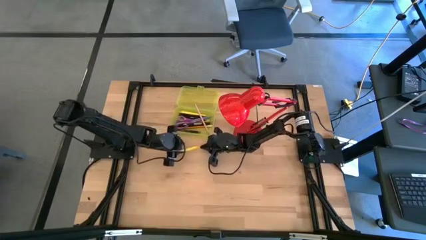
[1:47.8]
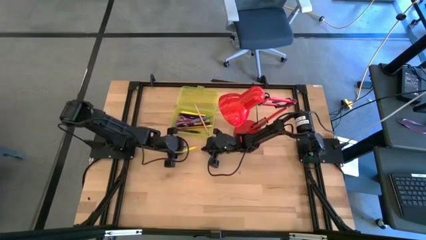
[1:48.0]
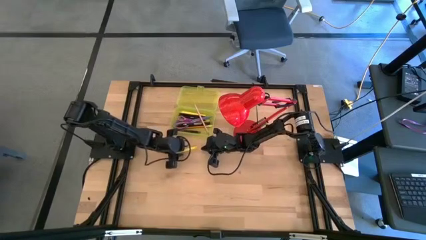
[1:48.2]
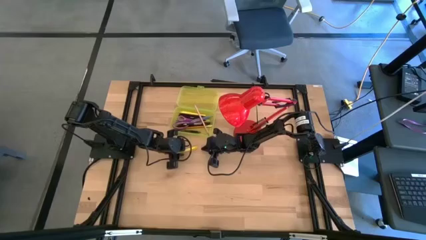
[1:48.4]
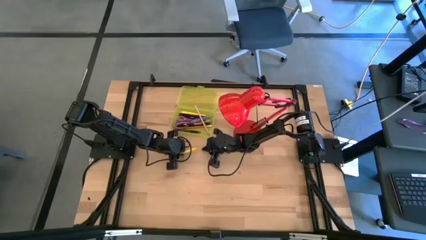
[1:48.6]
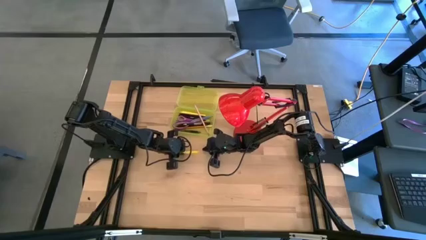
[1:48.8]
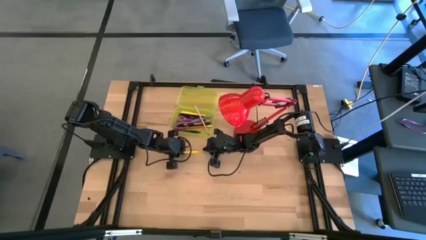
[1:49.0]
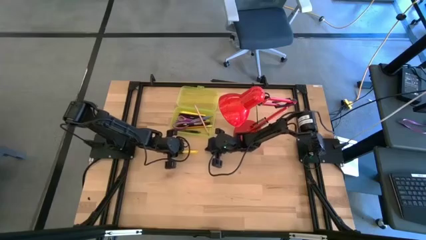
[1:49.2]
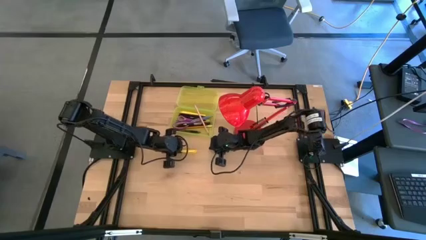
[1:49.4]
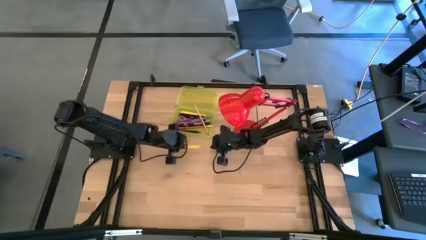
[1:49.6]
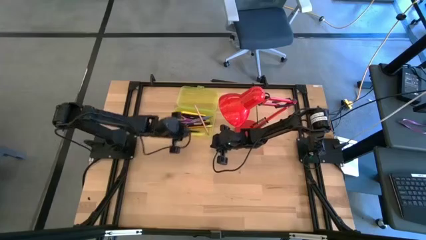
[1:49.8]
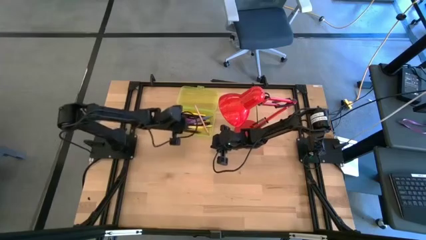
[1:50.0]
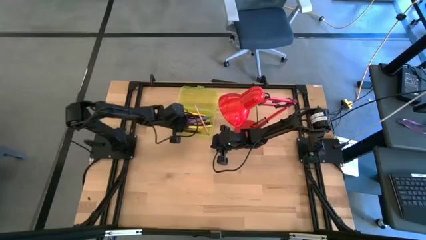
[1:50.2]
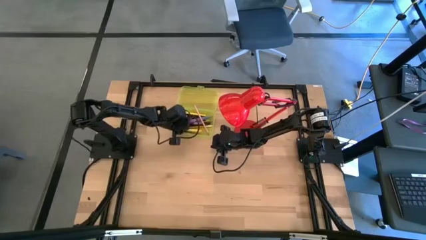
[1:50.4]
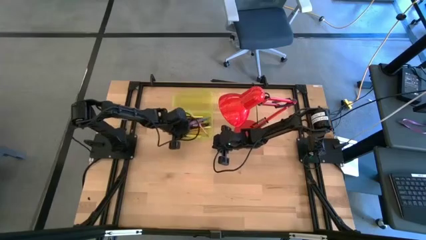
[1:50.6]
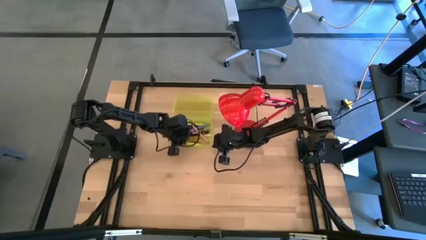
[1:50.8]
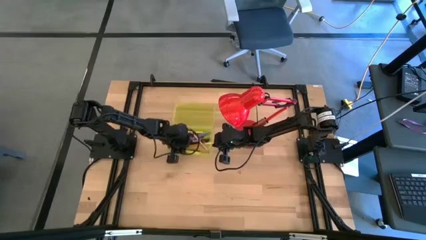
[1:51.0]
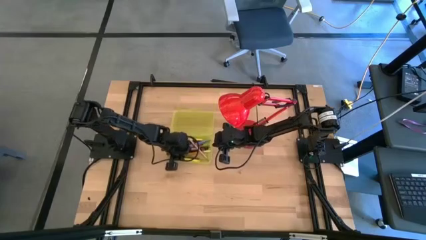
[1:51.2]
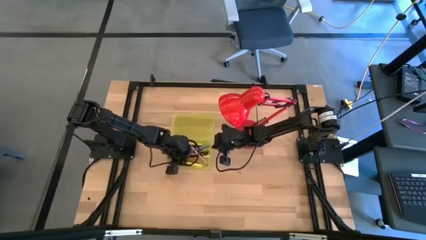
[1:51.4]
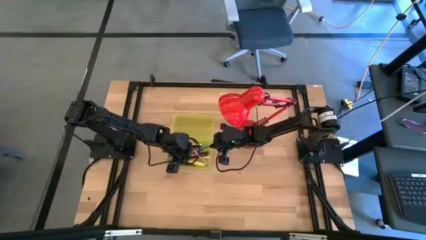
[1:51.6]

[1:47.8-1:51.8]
Task: Pick & place school supplies into a supply box
Put the yellow pen into the yellow supply box

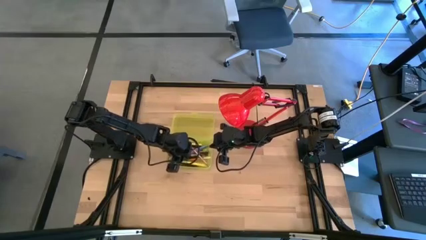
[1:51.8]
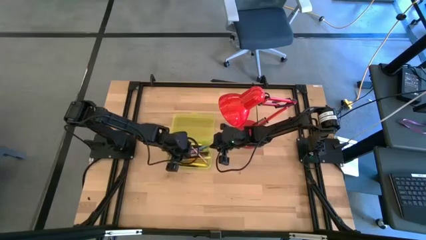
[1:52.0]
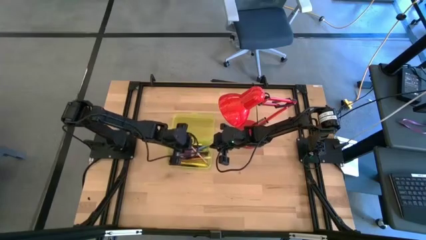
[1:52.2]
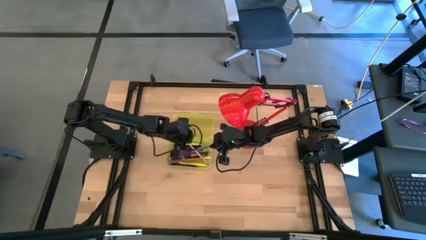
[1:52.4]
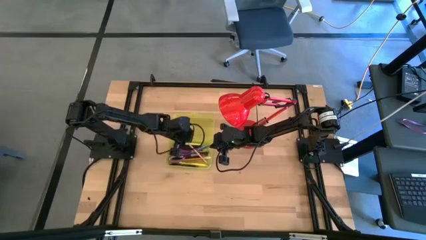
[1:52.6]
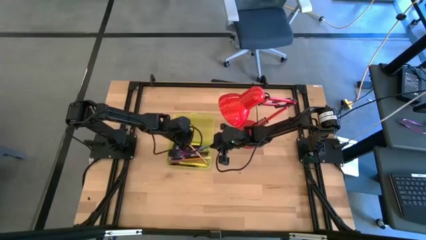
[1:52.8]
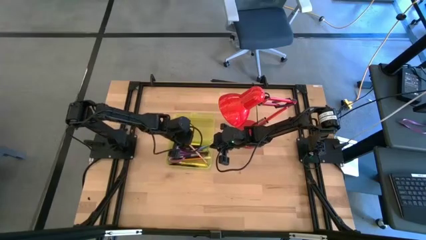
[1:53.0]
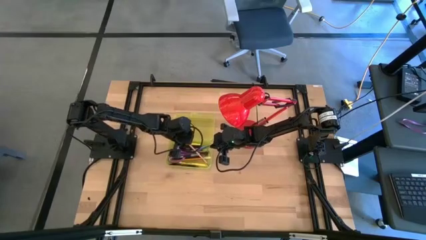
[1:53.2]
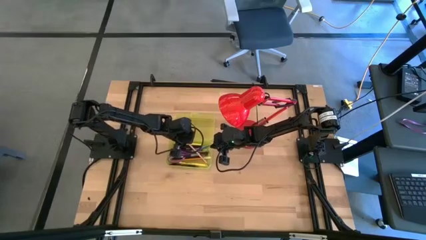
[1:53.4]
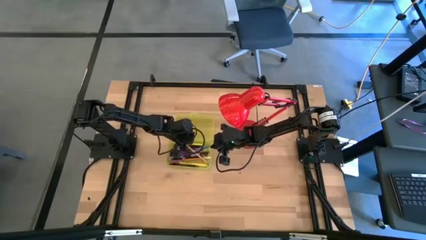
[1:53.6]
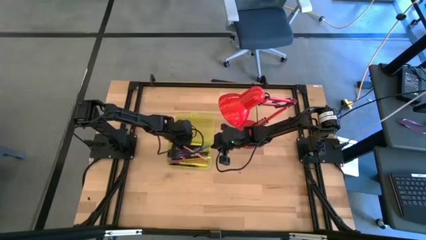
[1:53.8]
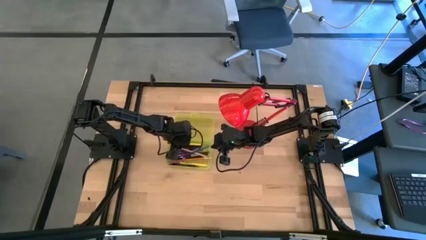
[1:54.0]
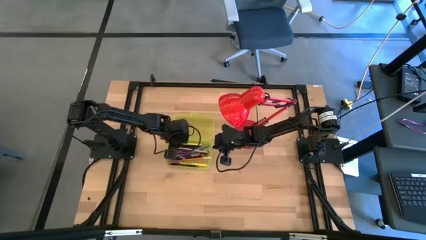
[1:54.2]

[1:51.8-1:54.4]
Adjust the pink pencil in the yellow supply box

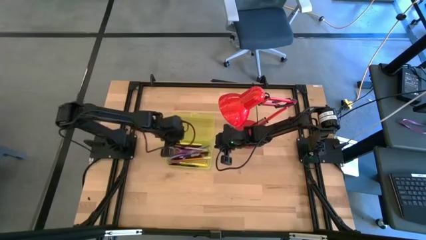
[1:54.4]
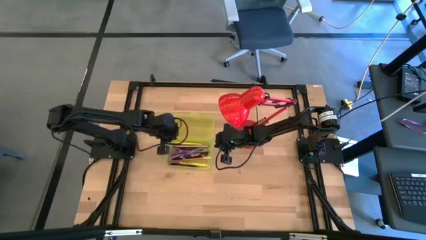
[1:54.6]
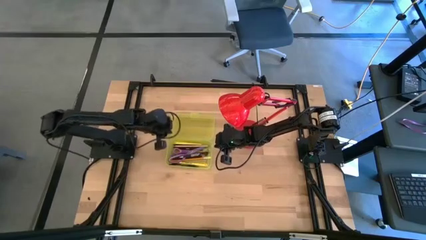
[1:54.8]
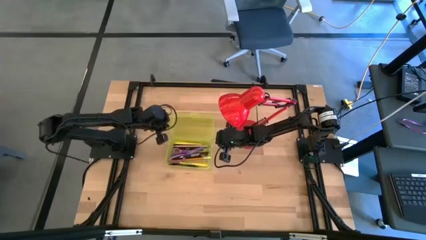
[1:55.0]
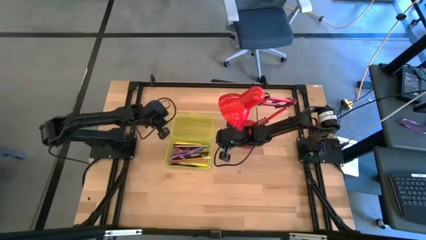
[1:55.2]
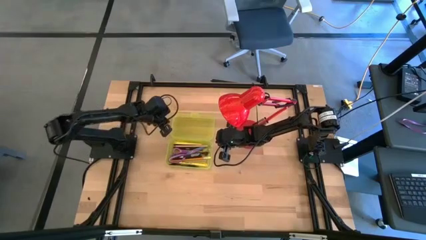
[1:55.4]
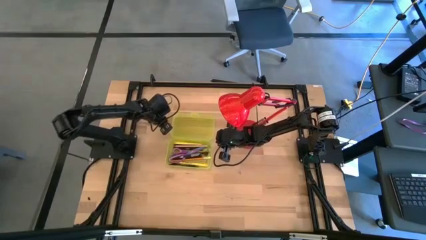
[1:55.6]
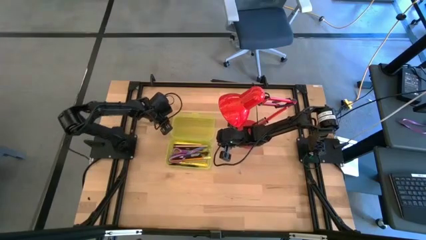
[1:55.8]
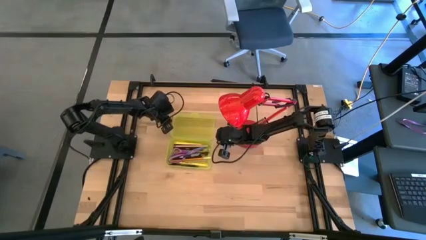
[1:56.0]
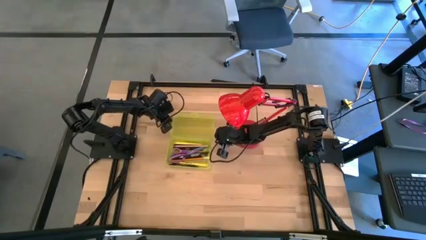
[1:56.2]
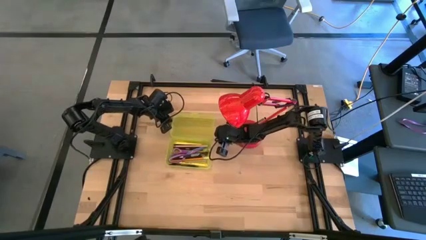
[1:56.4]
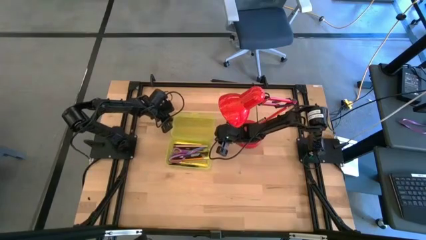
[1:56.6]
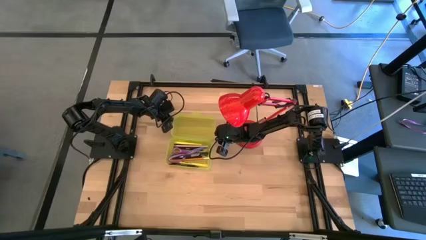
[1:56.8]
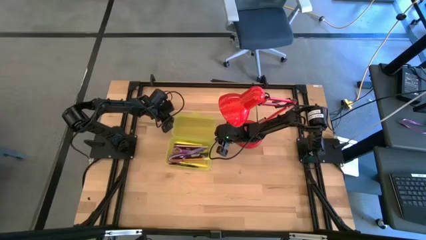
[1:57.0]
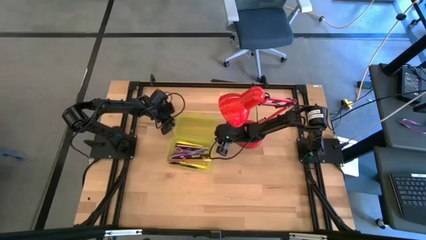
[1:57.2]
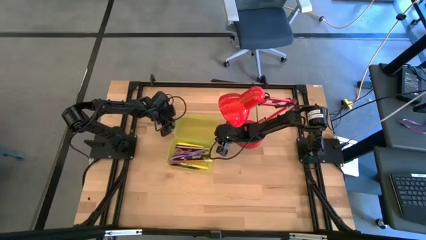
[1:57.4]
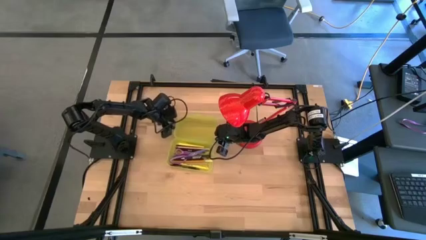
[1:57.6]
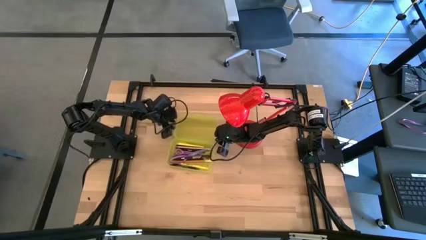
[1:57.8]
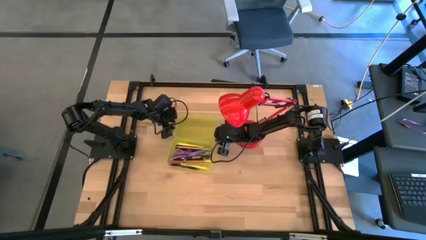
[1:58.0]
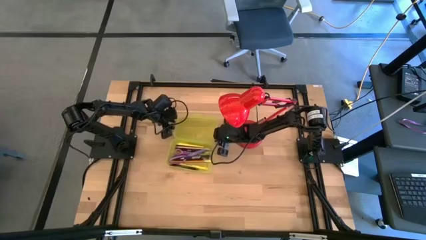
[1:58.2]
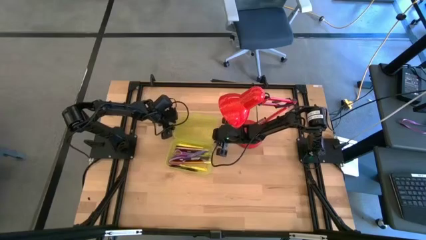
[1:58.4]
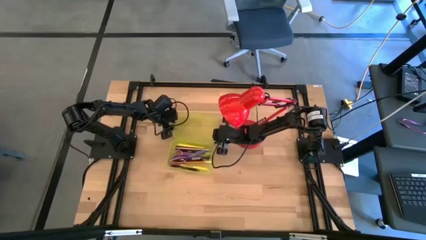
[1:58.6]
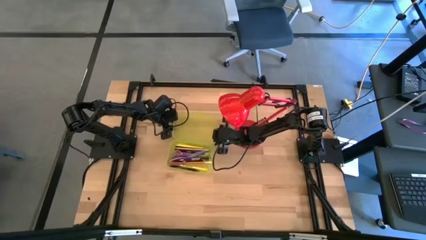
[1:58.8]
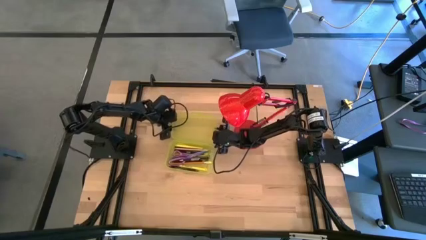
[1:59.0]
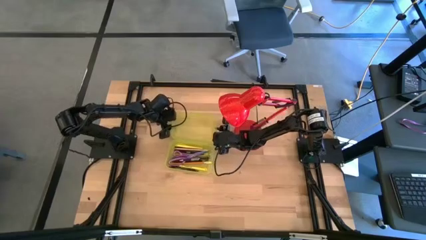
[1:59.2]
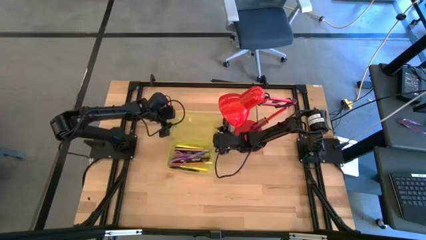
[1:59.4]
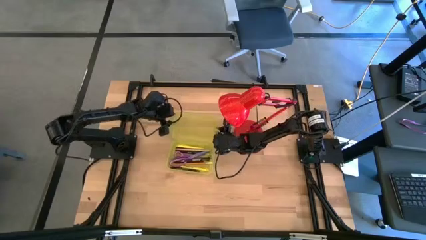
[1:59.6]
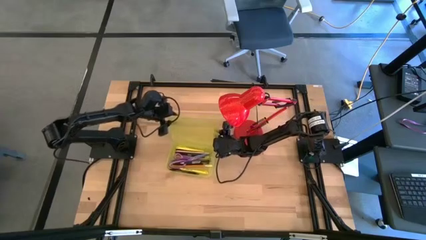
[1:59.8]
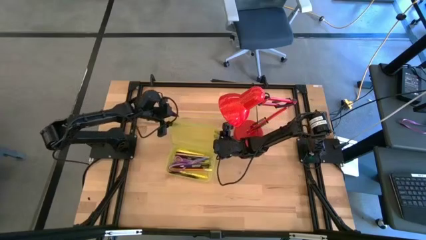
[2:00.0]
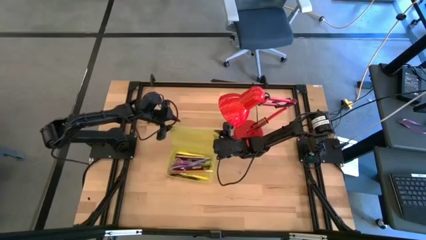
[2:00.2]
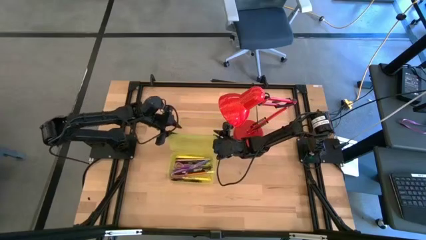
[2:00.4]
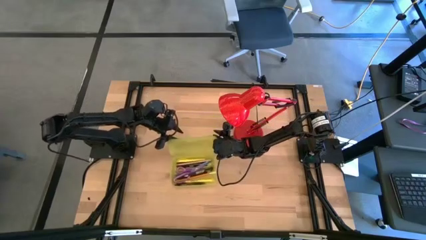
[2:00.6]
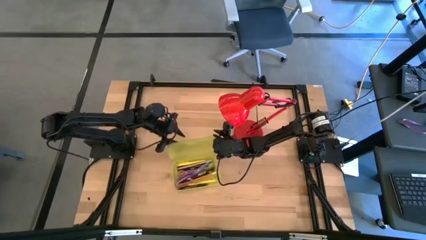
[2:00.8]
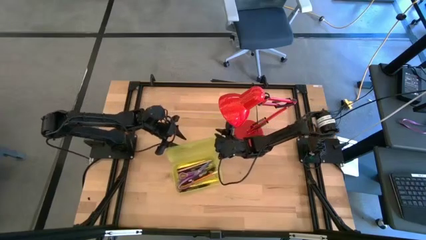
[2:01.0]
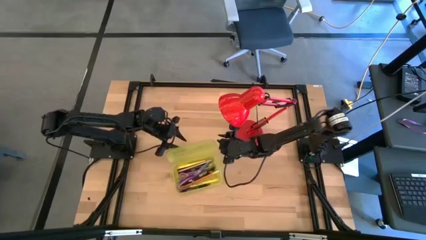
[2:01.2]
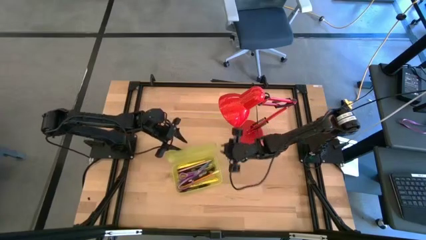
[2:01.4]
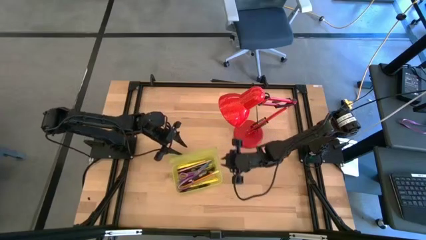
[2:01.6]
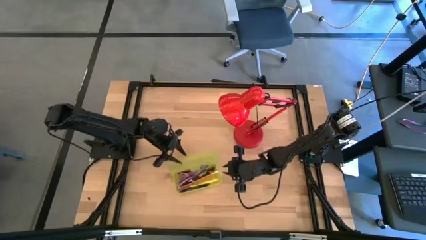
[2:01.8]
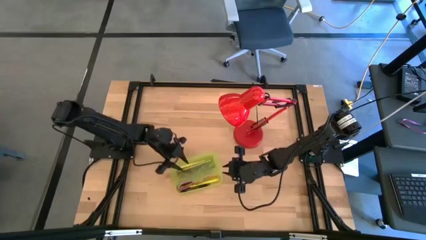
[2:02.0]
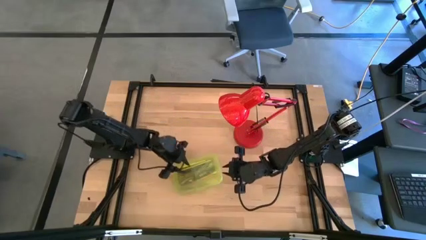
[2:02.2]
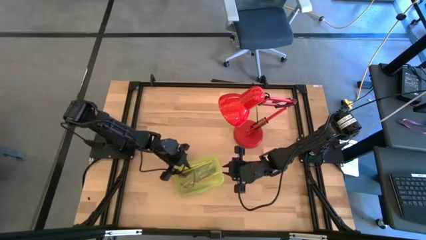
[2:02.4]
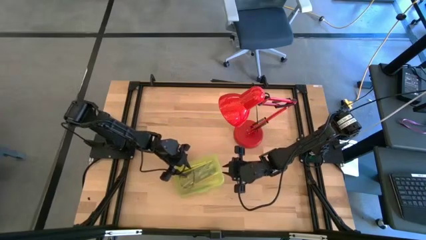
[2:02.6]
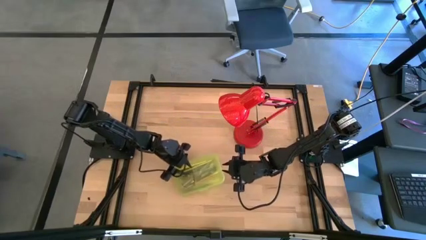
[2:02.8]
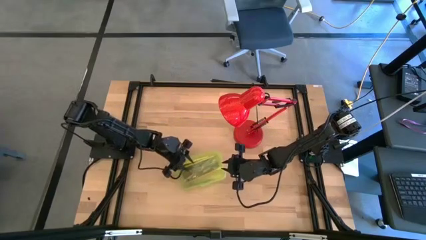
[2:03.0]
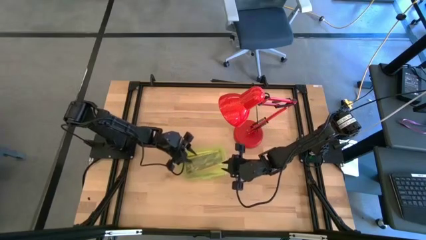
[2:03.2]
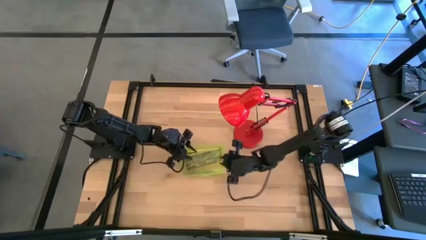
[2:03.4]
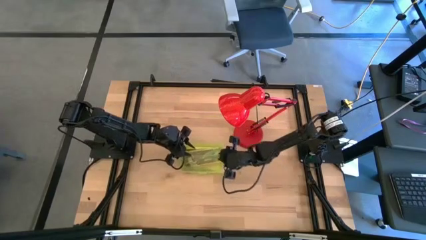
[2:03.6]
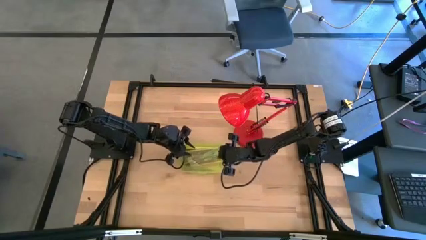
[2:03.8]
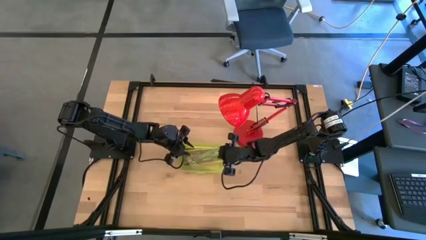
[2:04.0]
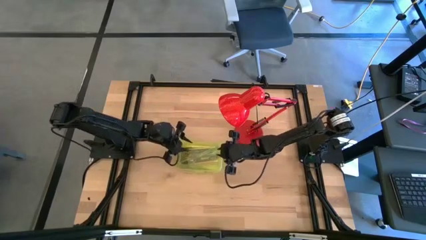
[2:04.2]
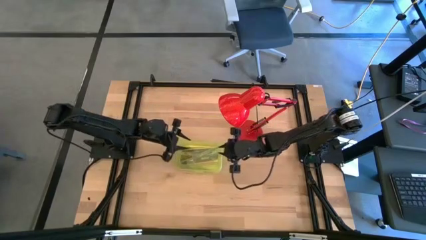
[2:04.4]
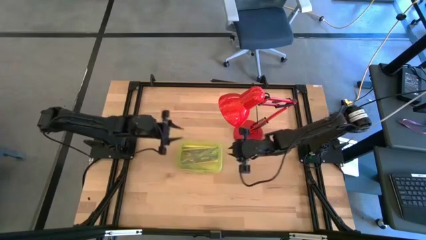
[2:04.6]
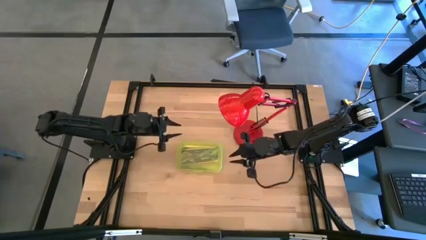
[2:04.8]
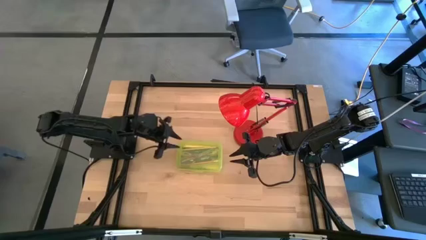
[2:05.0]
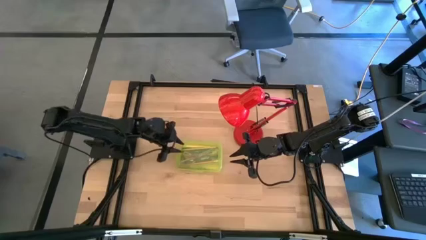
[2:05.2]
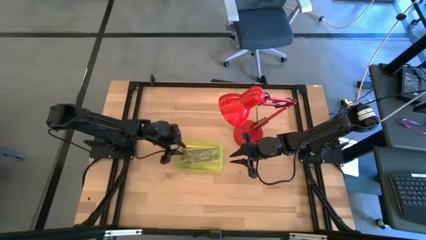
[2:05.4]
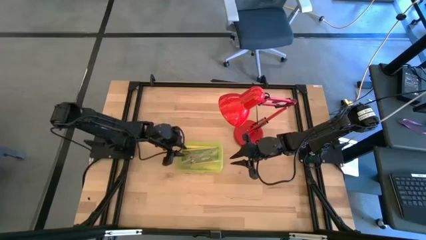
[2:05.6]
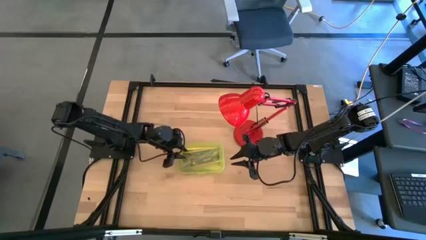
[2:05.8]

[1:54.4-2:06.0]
Close the yellow supply box
